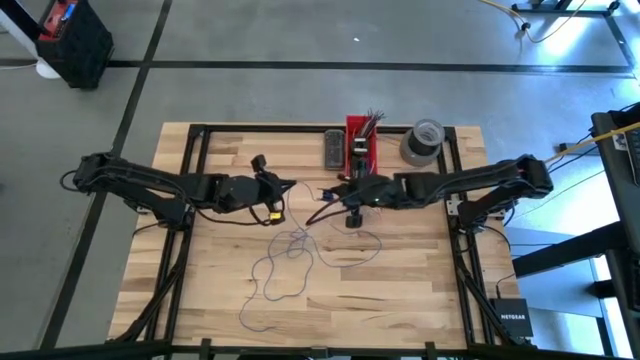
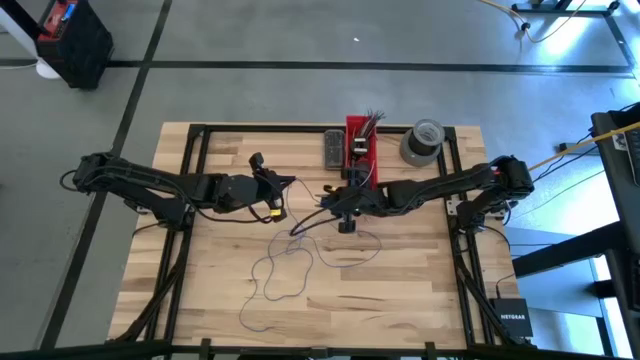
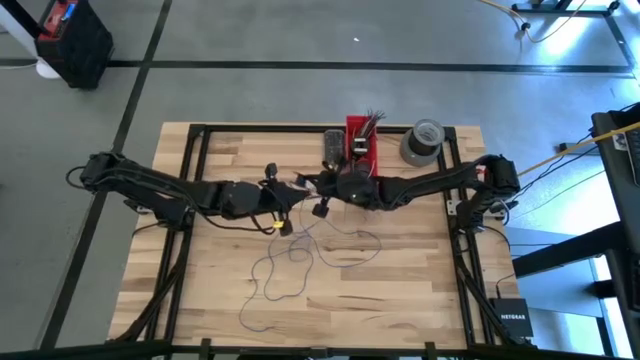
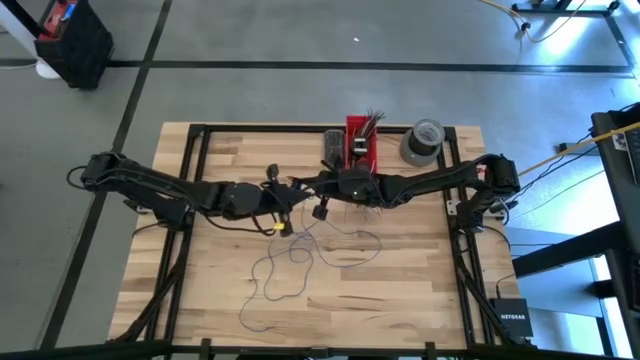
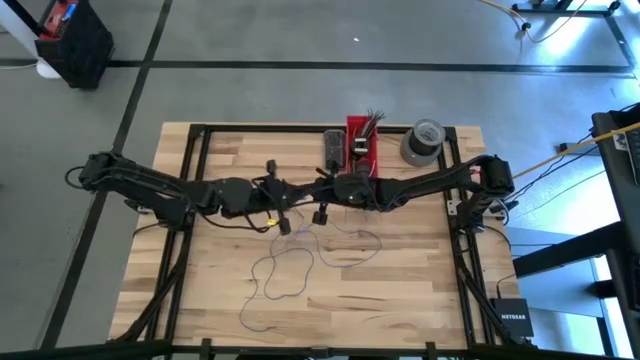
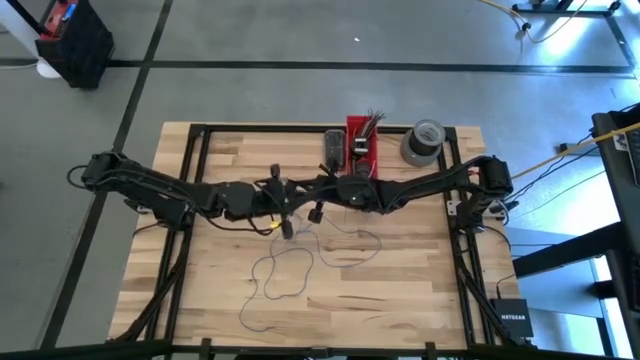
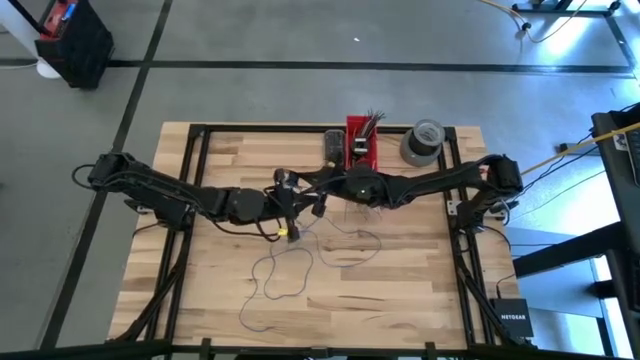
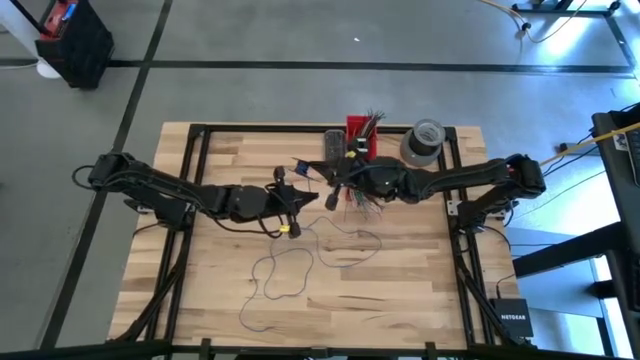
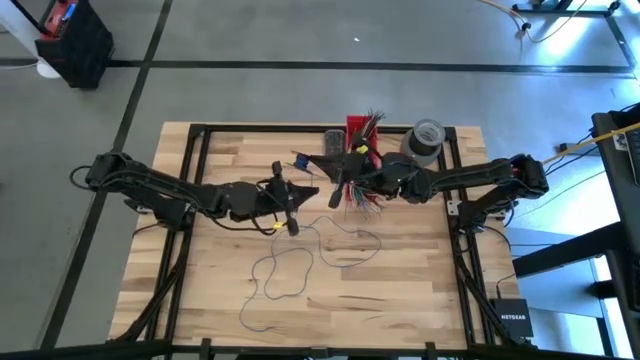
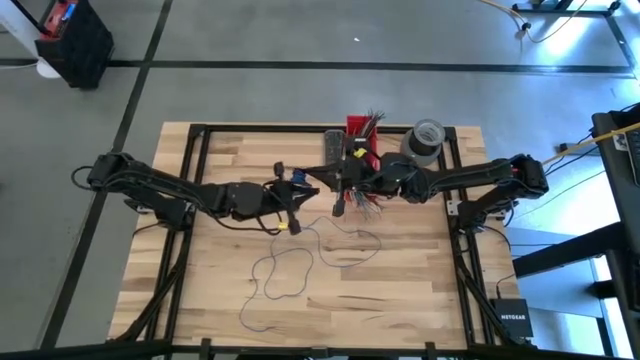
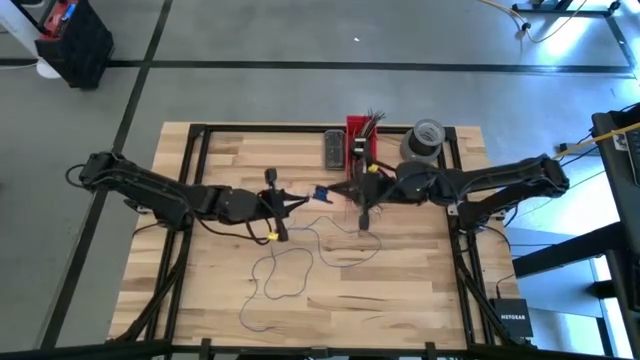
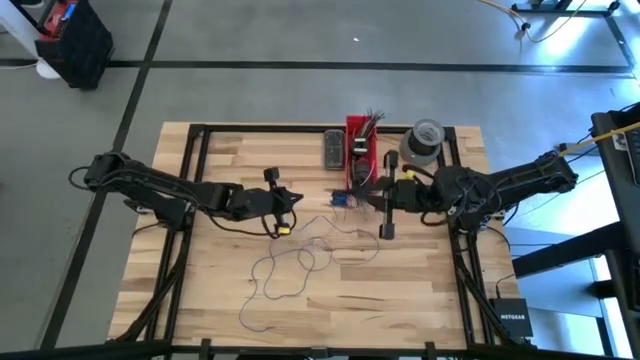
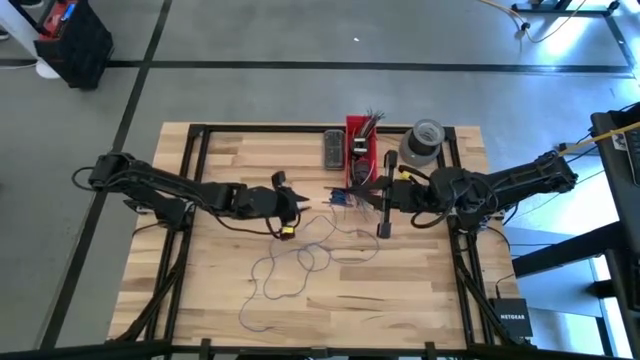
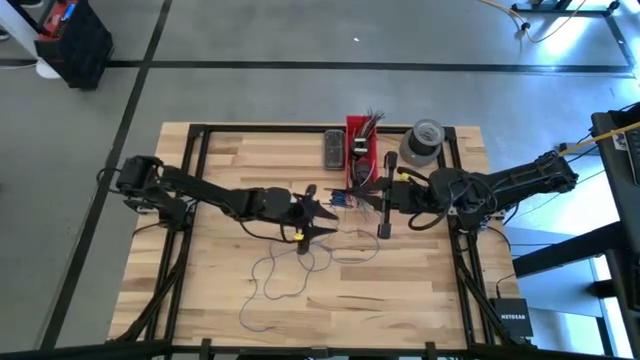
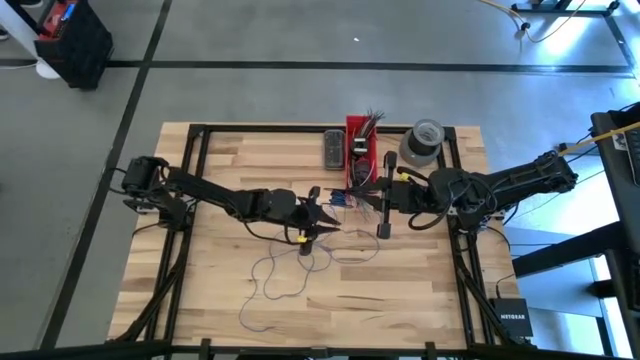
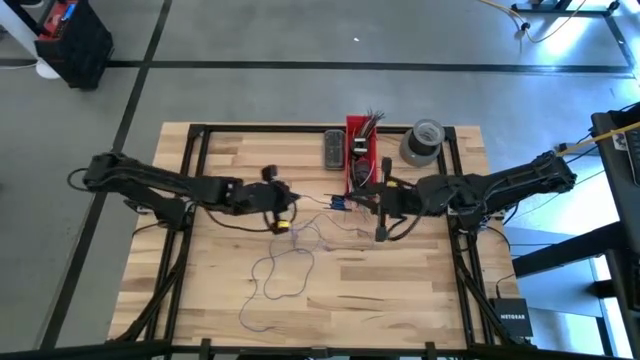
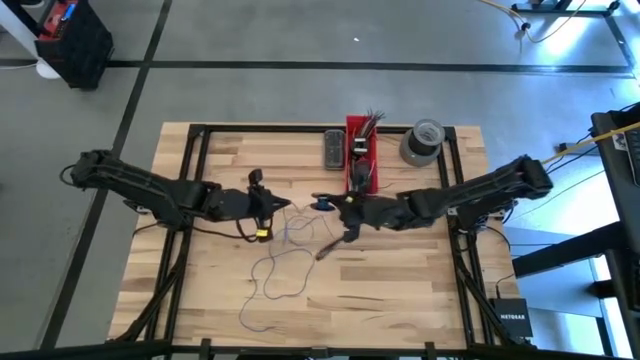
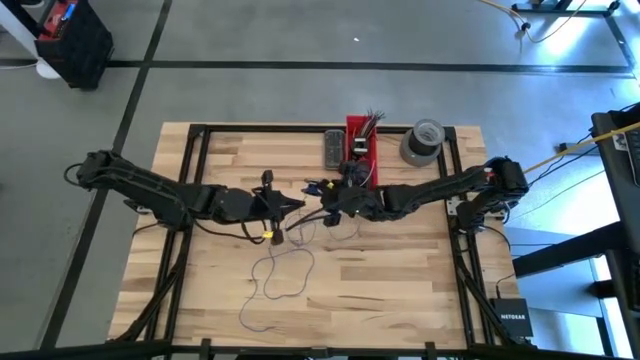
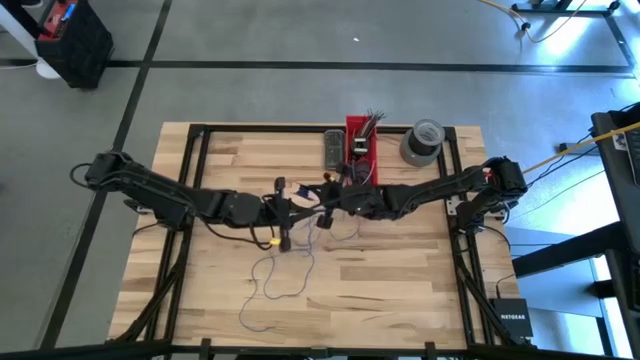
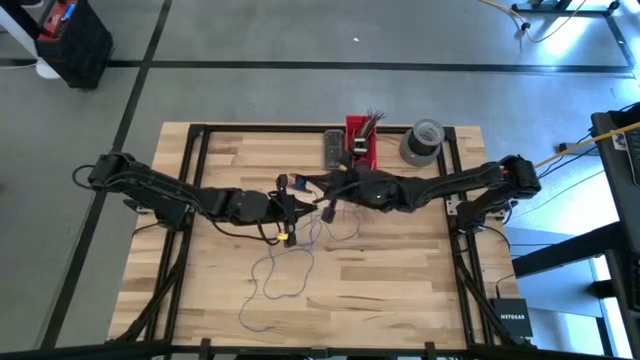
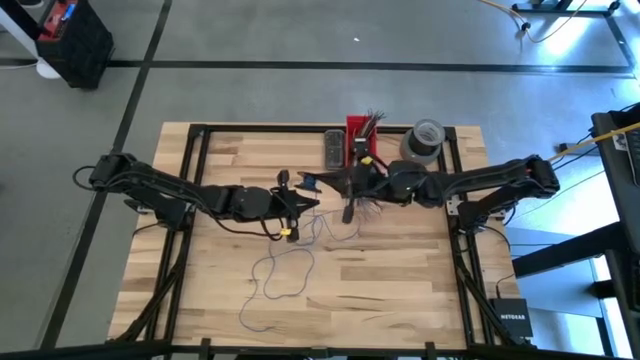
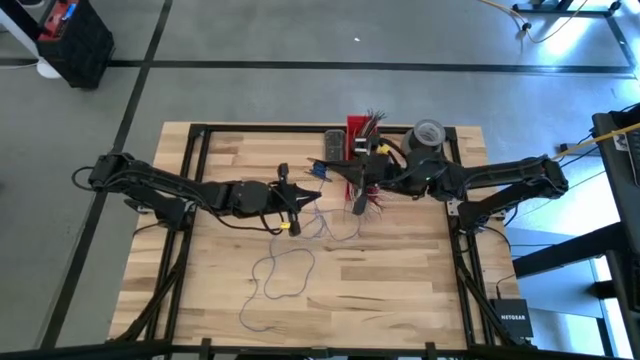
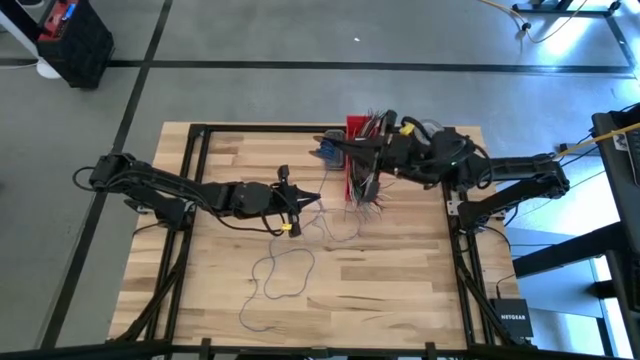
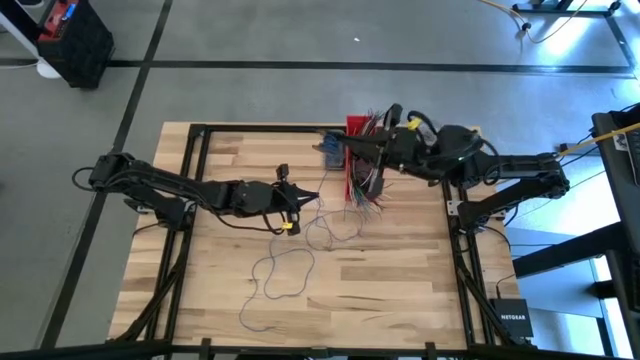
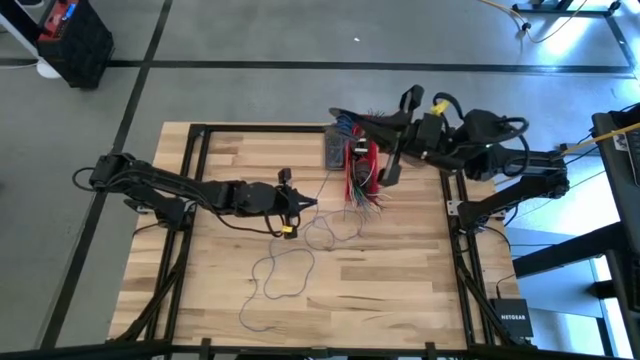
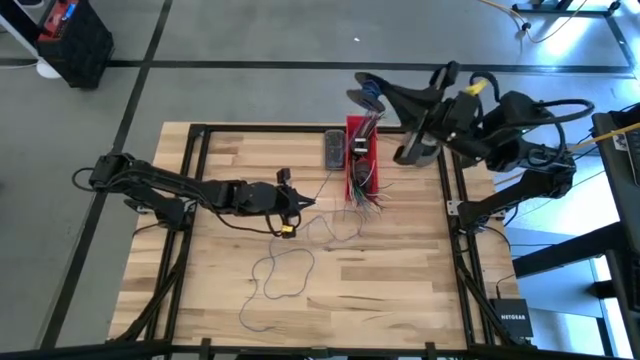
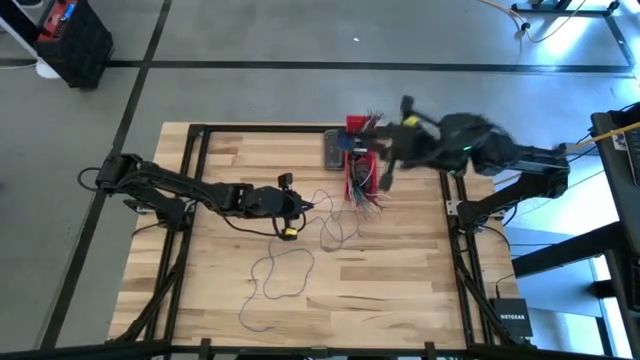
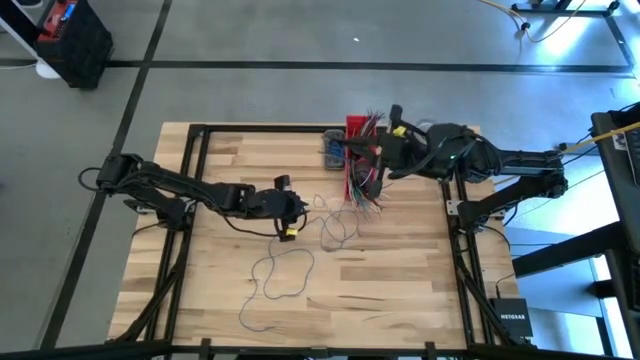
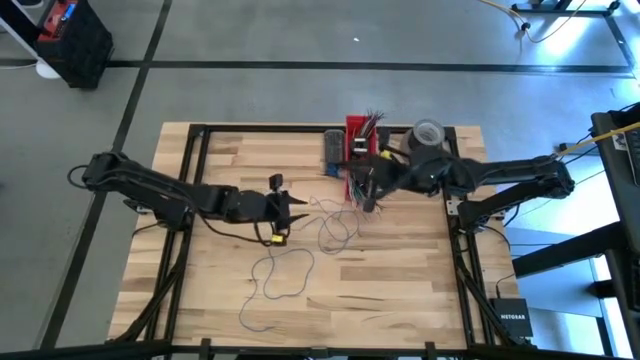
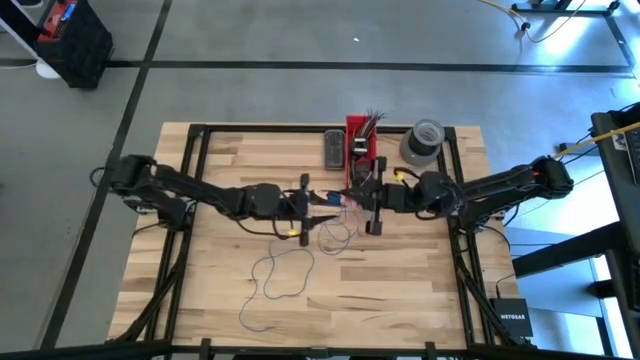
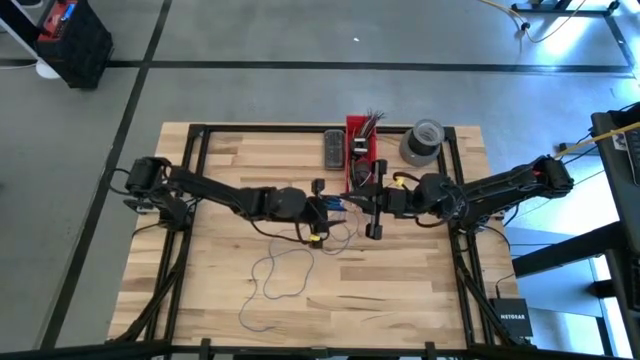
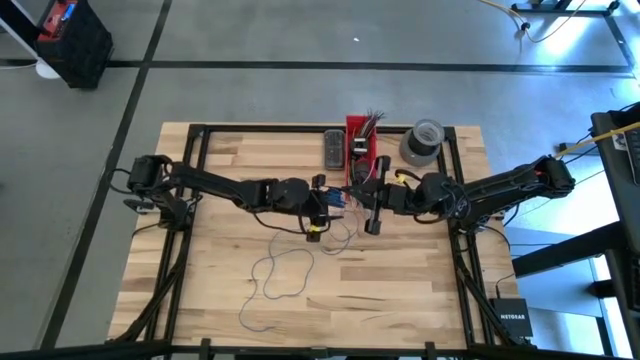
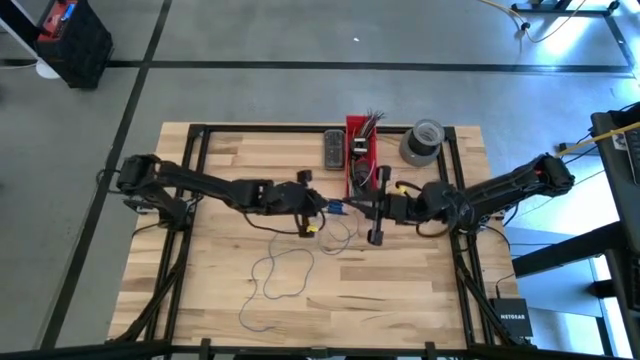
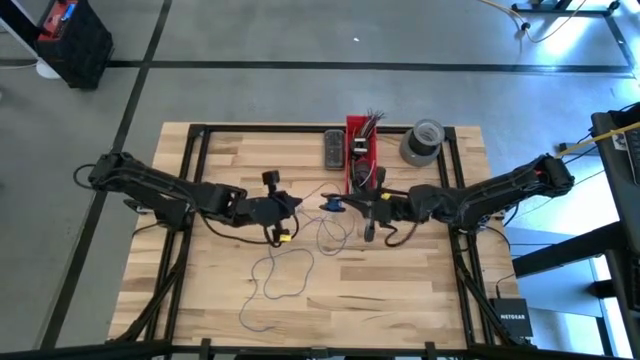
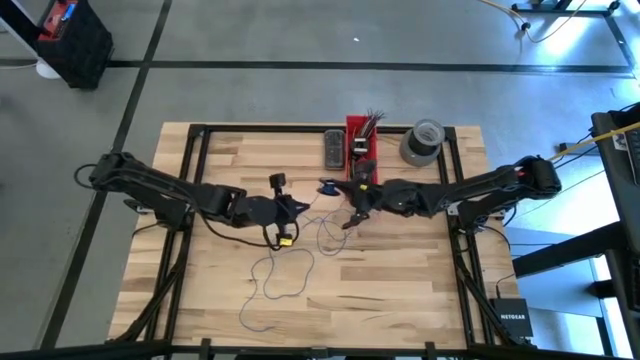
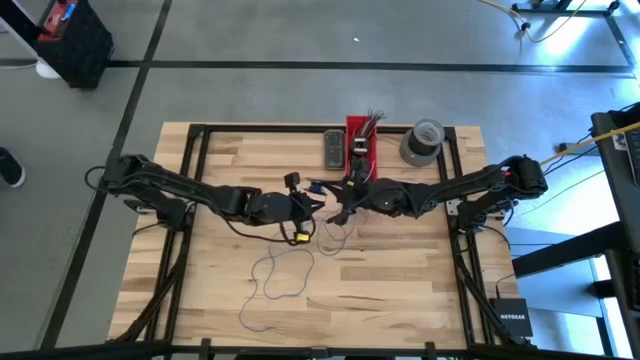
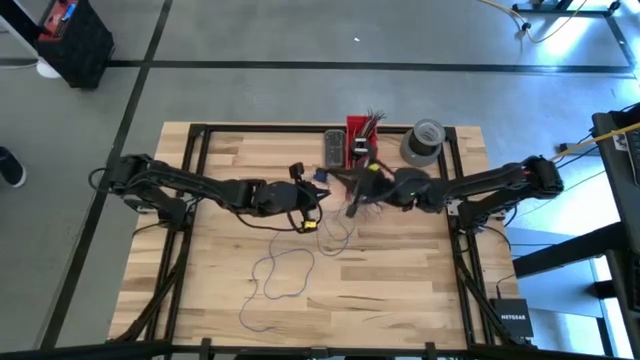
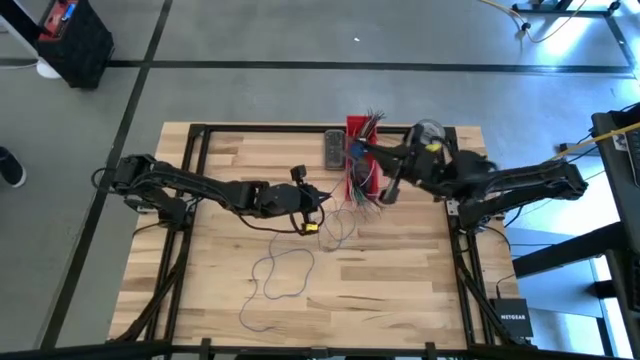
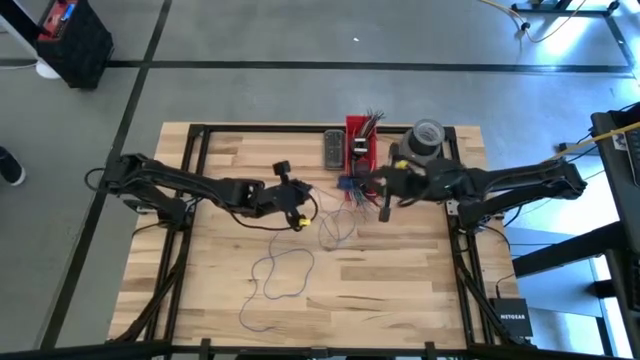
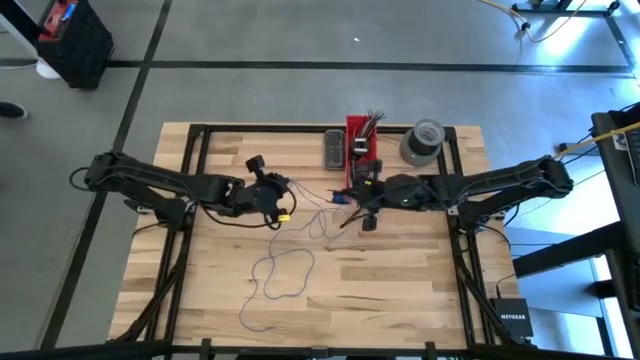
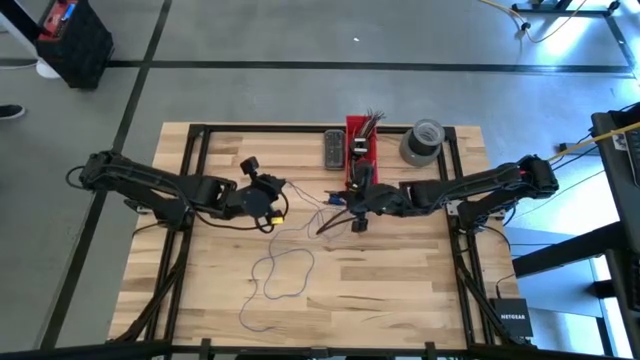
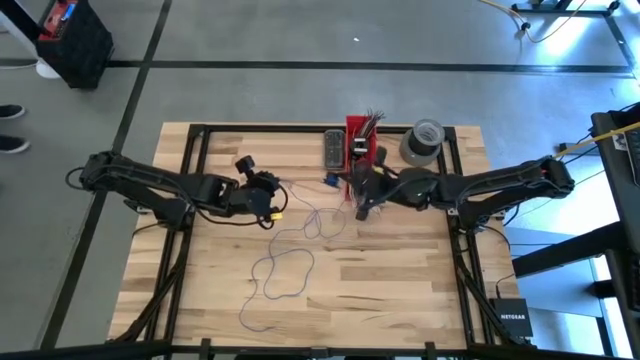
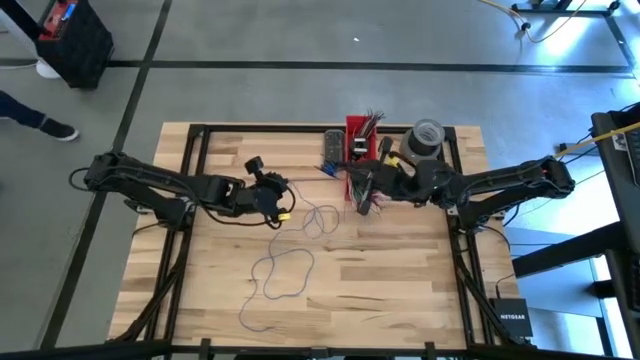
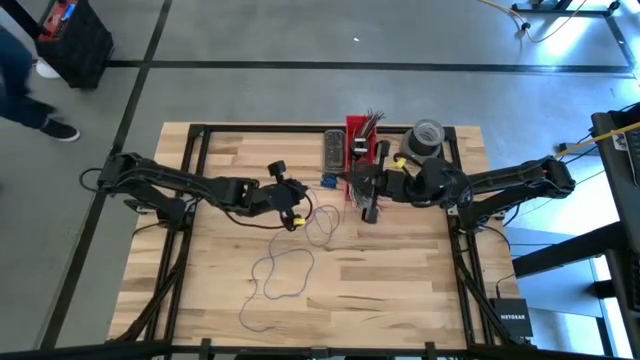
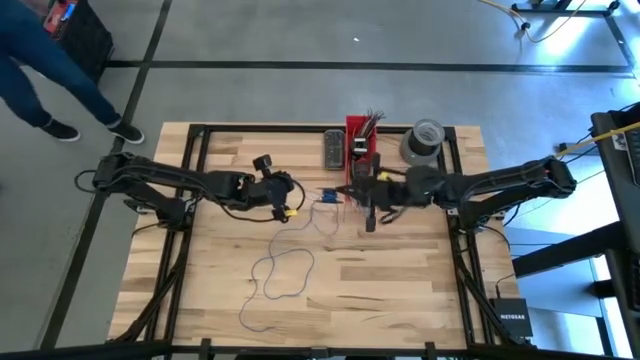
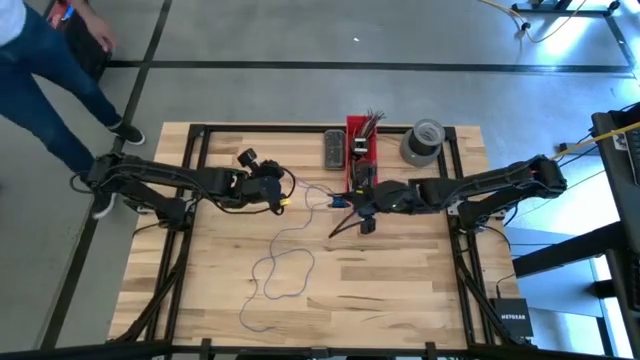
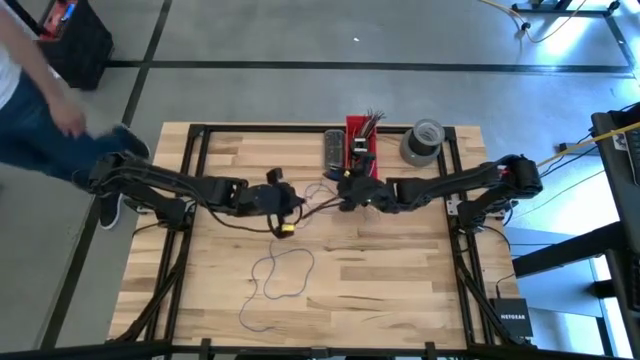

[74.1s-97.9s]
Task: Coil cords
Coil the blue wire into the black spool
